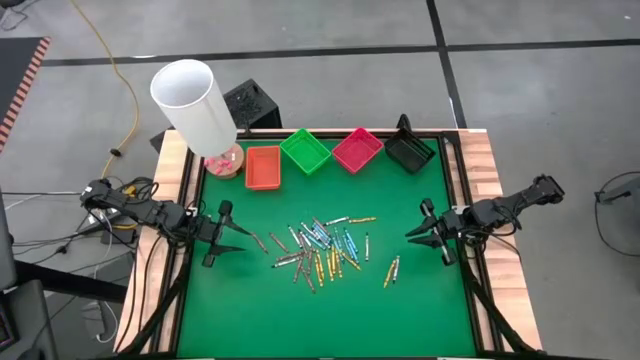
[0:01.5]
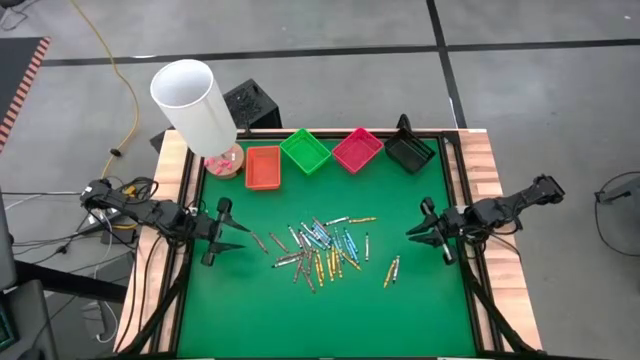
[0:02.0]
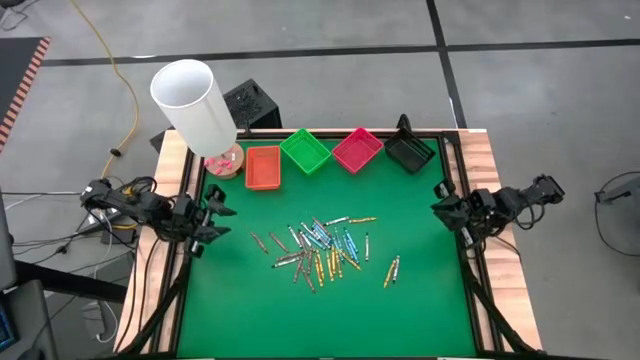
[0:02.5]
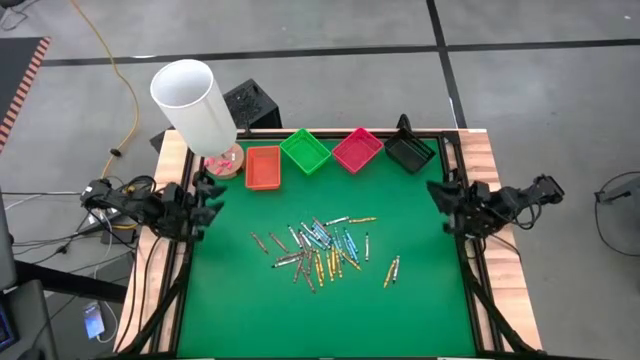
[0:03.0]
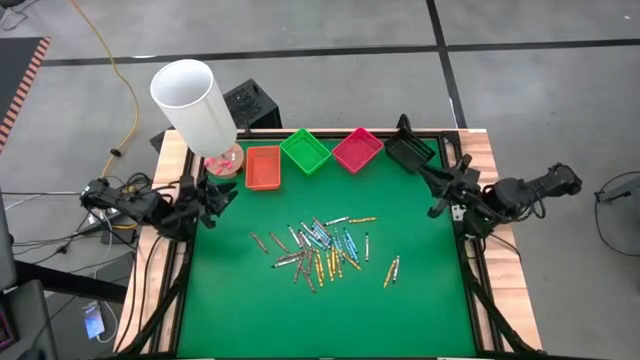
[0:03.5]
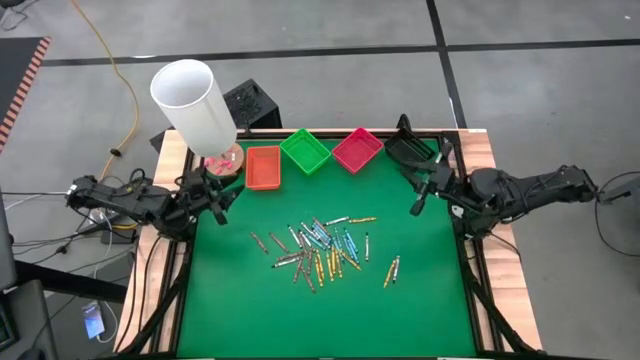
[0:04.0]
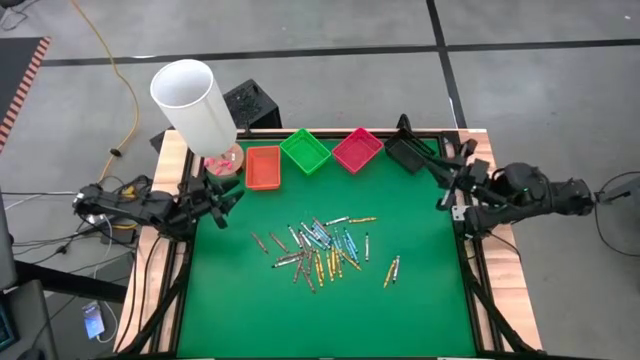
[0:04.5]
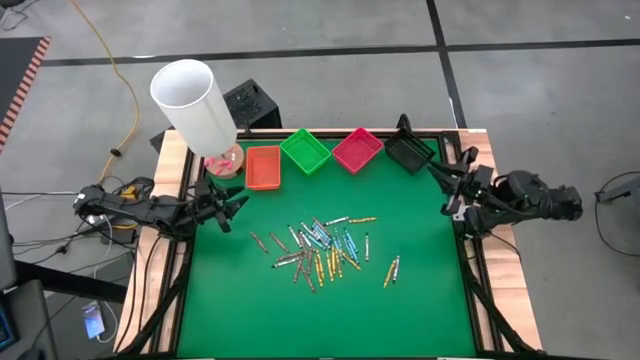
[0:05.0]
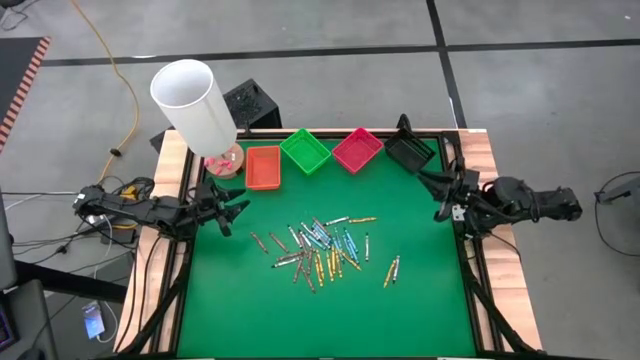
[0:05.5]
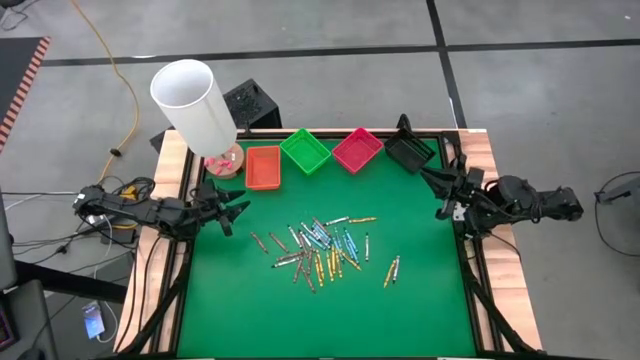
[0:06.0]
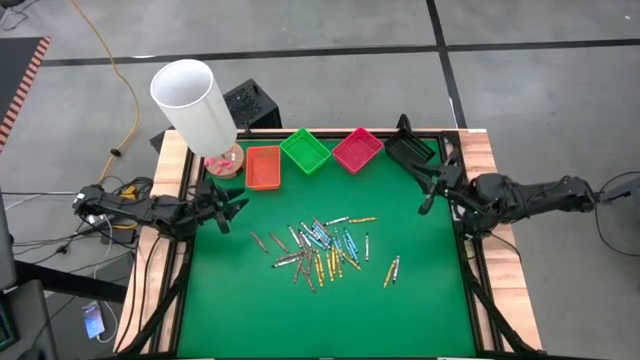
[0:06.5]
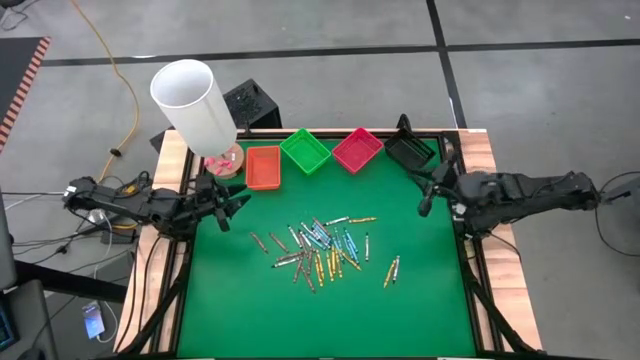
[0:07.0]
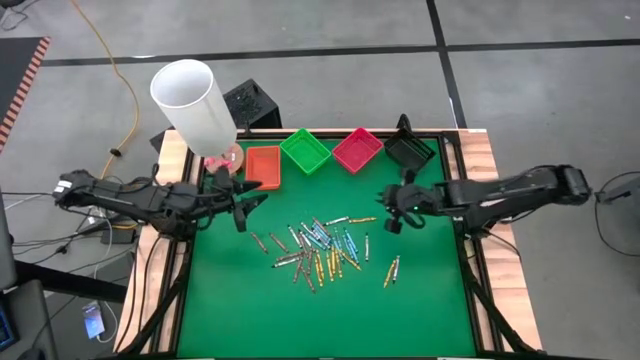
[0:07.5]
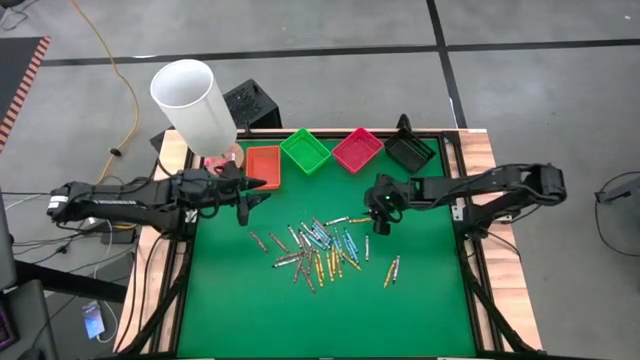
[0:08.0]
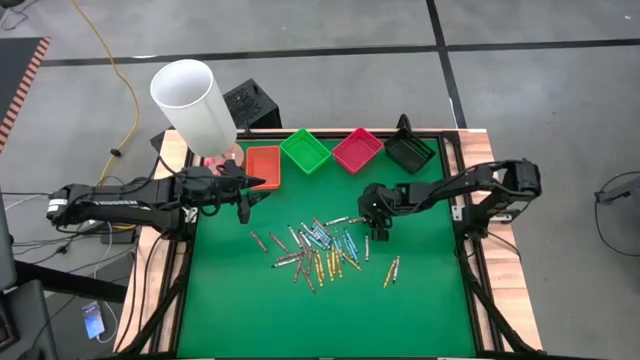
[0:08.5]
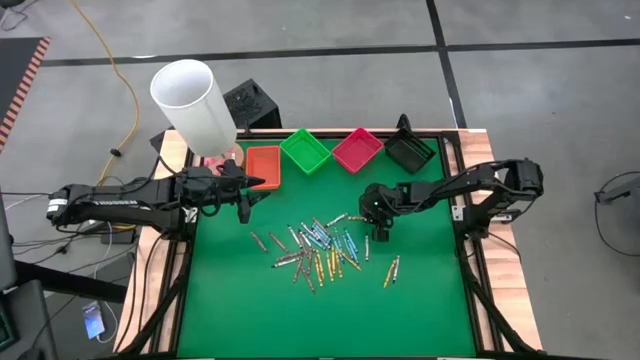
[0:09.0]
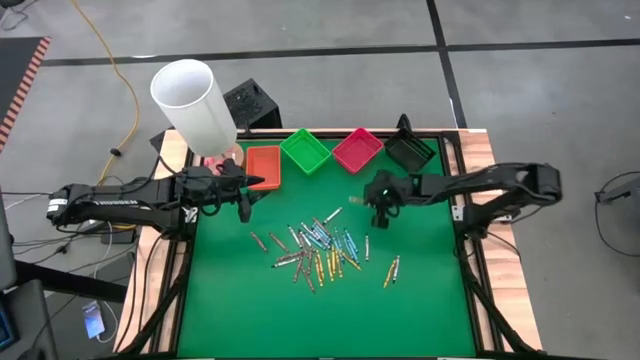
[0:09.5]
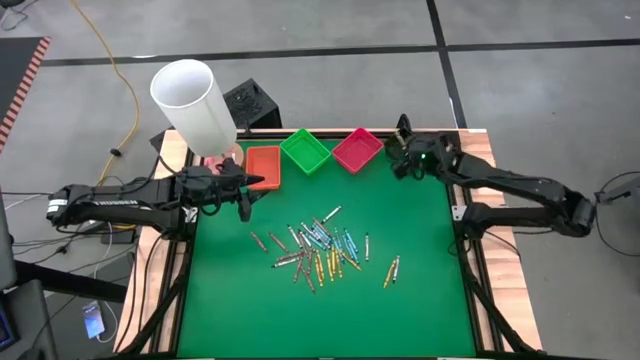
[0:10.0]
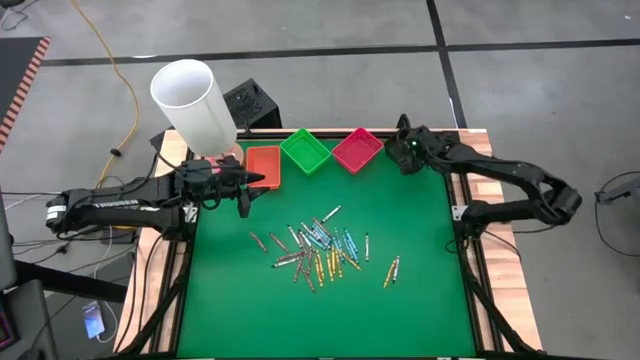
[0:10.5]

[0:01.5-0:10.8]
Task: Sort crayons
Put the yellow/green crayon into the black bin

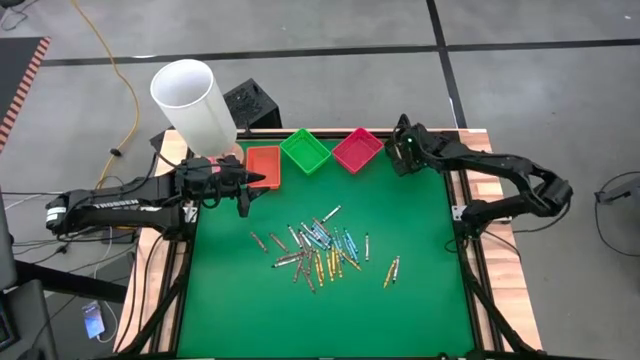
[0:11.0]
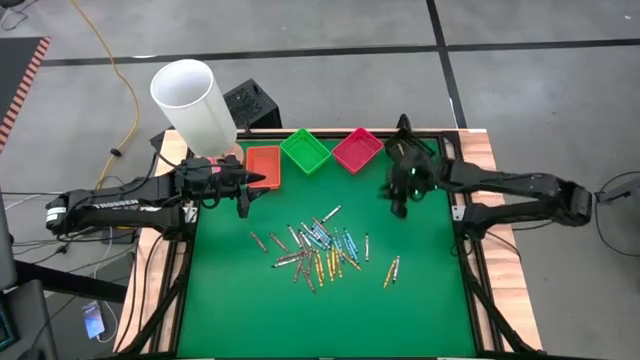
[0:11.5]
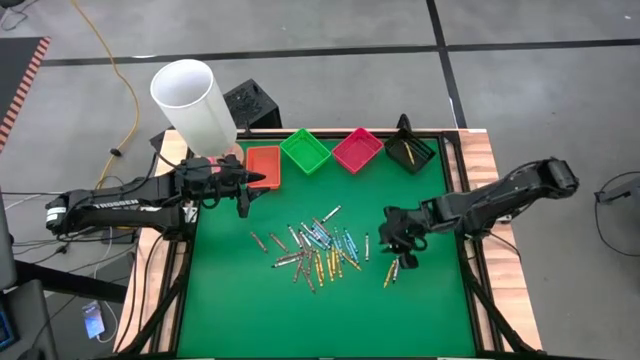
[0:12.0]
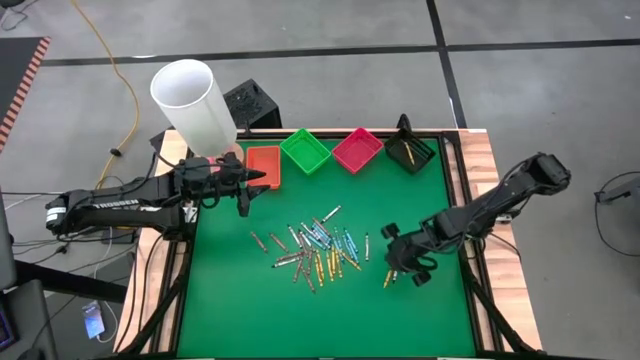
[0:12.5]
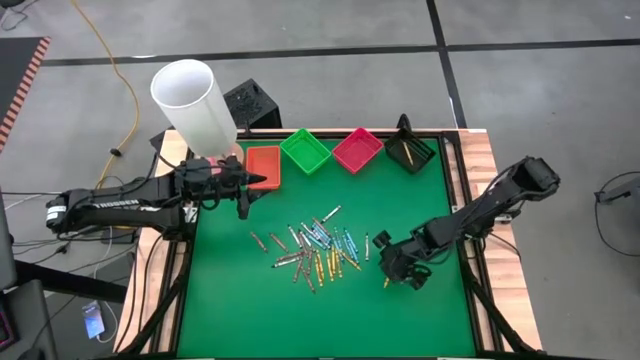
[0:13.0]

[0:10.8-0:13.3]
Put the yellow/green crayon into the black bin

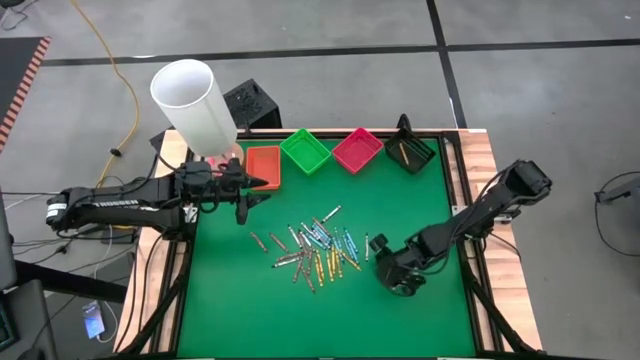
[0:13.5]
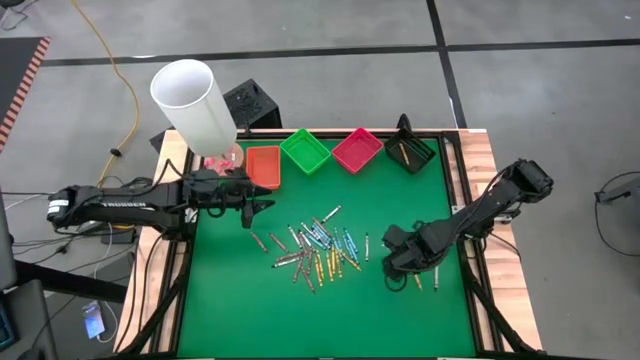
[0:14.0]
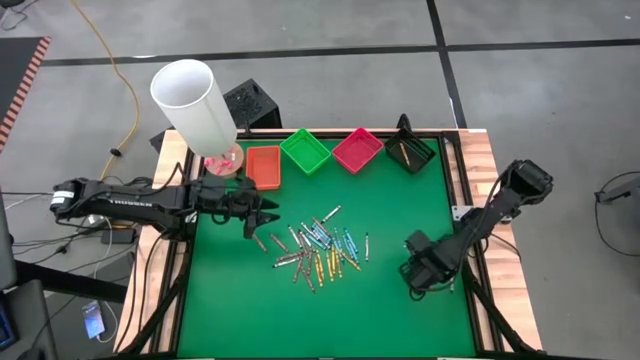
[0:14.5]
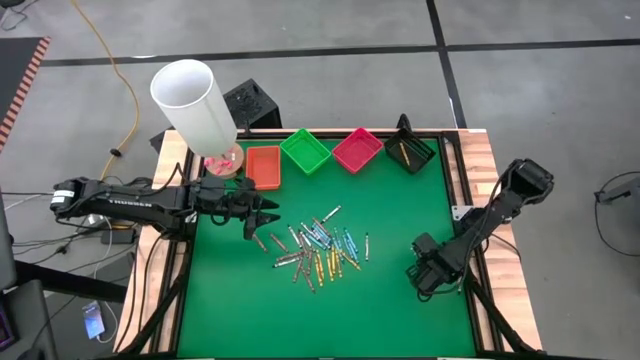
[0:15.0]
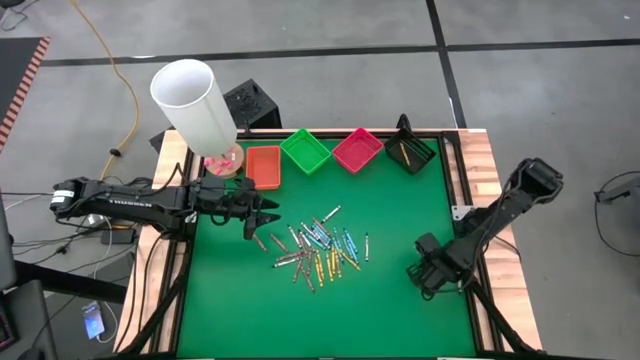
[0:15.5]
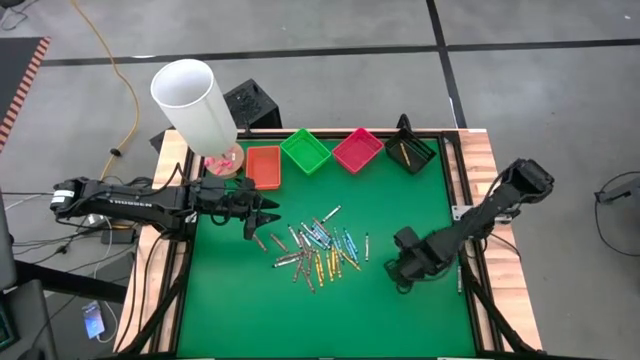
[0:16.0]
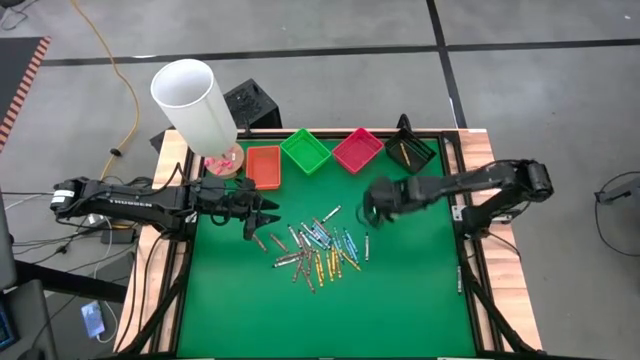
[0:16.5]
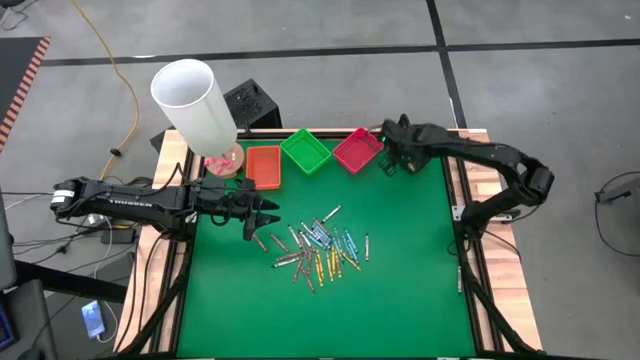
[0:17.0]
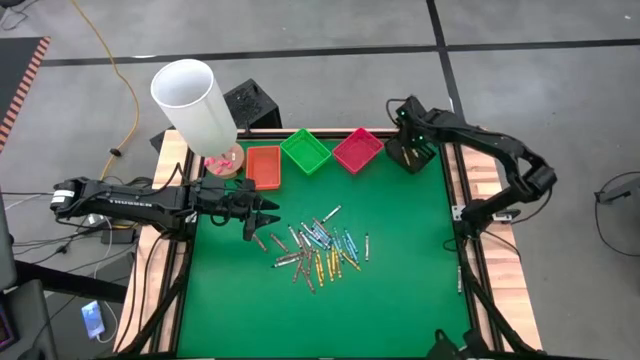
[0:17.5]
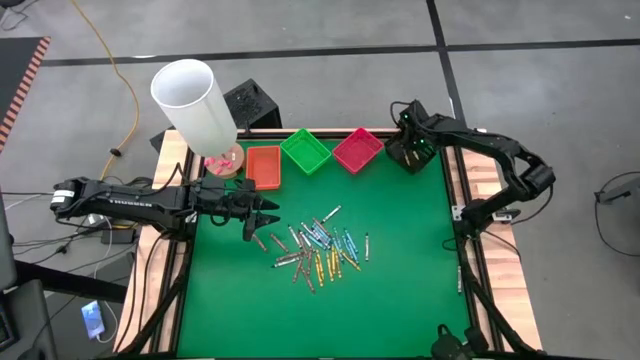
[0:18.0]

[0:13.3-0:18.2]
Put the yellow/green crayon into the black bin

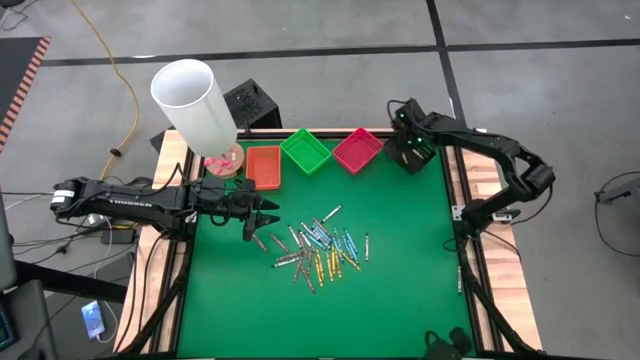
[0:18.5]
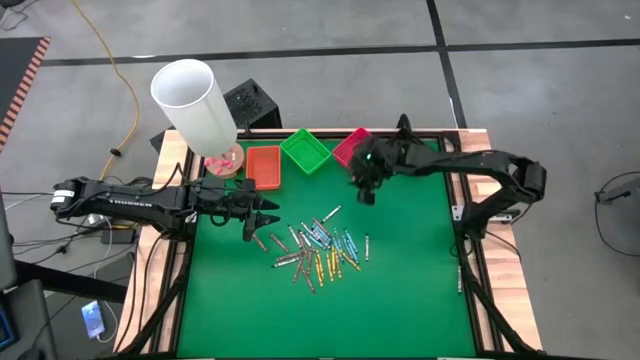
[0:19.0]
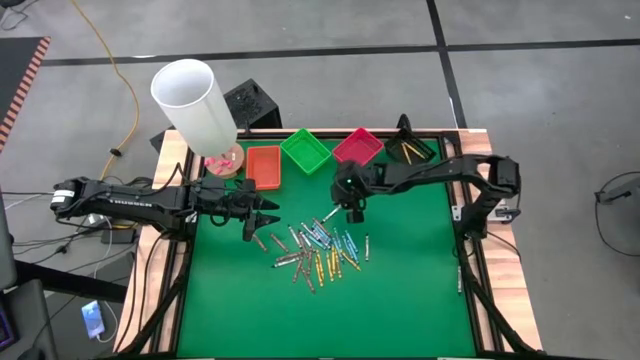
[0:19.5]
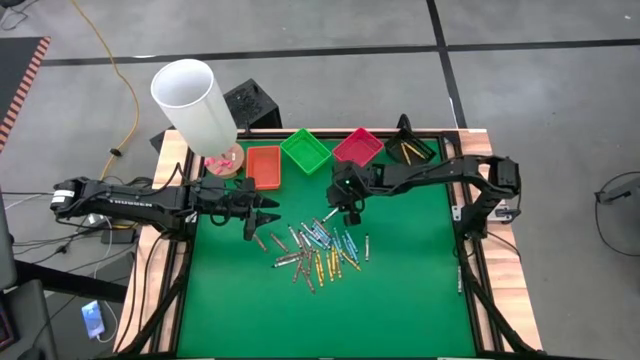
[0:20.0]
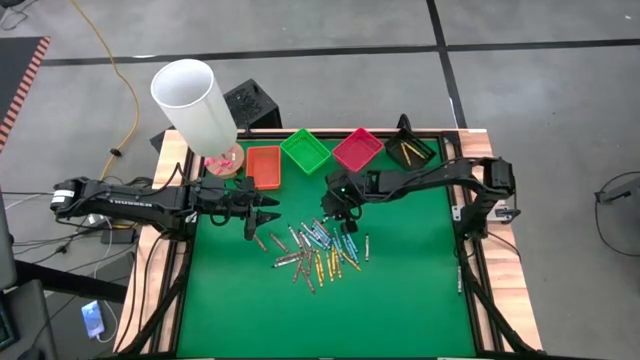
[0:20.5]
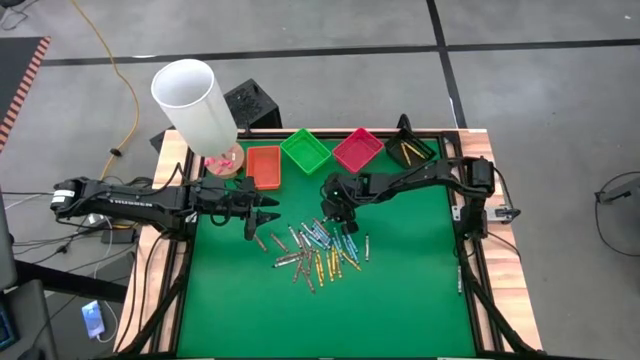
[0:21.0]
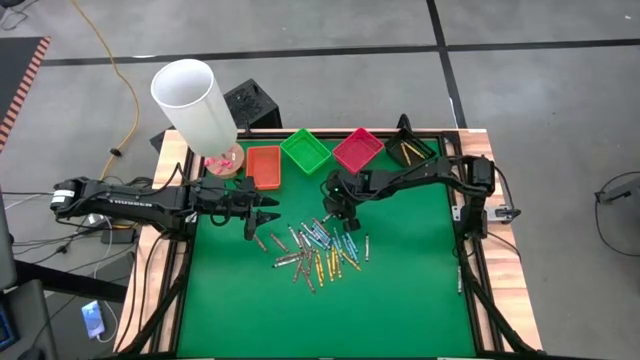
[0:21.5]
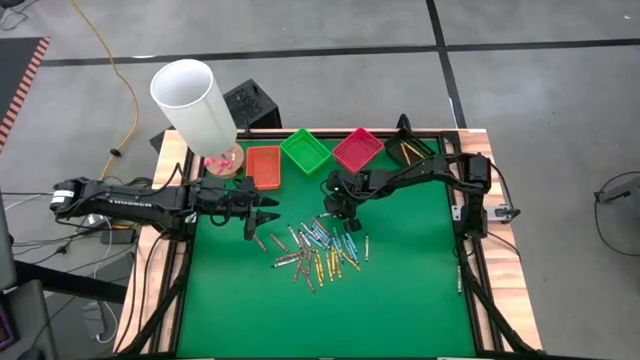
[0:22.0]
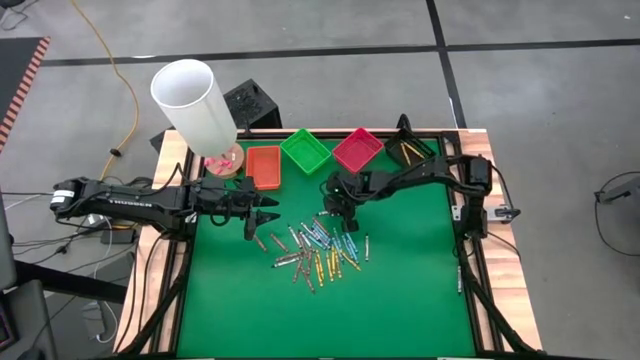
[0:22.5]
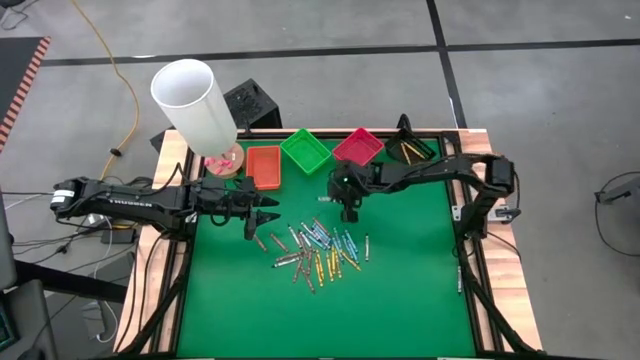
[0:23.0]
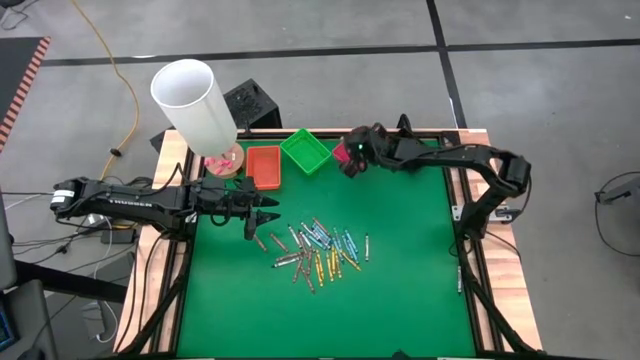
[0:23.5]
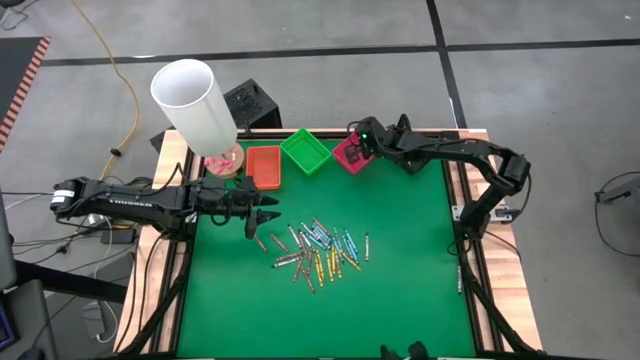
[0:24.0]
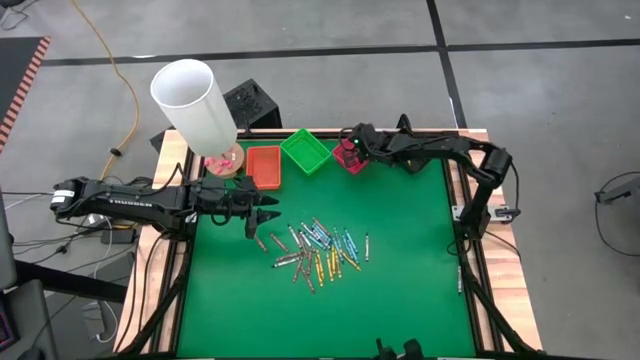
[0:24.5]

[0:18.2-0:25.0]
Put the black crayon into the red bin
